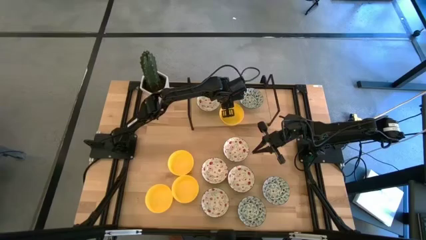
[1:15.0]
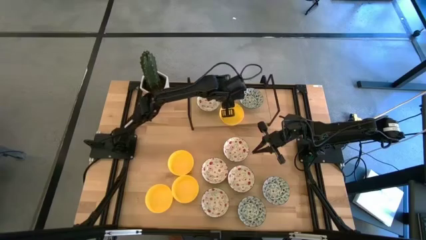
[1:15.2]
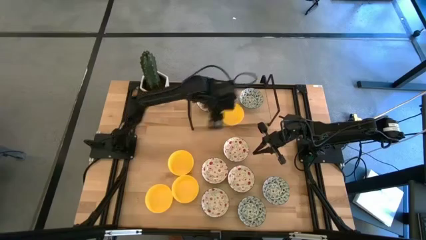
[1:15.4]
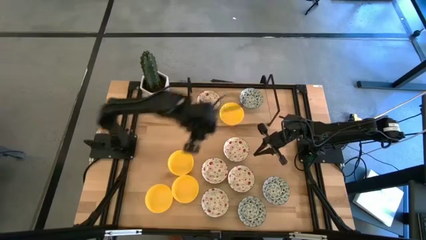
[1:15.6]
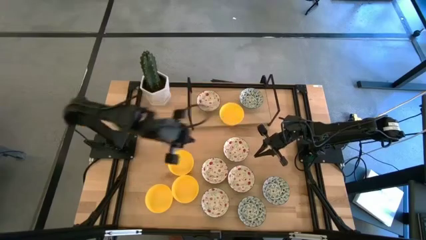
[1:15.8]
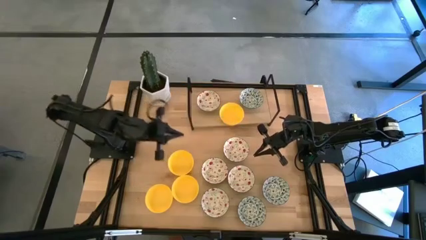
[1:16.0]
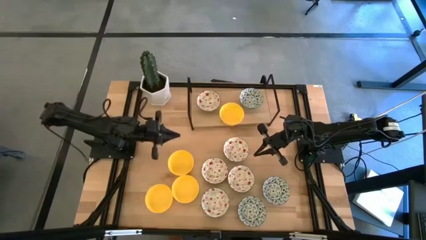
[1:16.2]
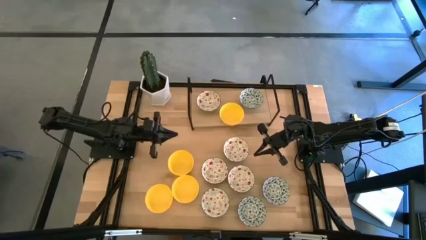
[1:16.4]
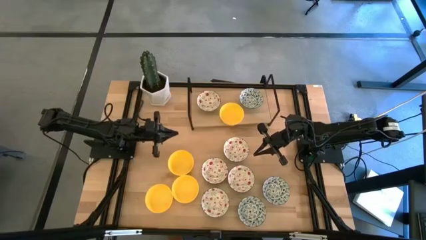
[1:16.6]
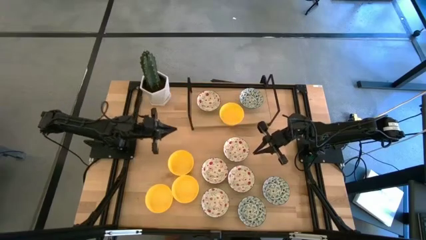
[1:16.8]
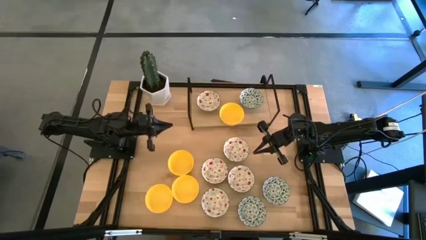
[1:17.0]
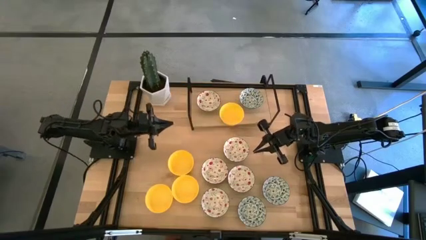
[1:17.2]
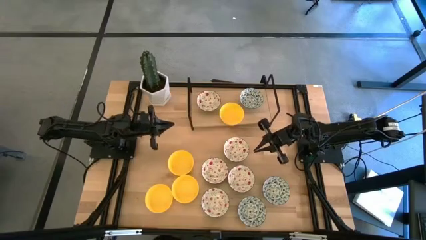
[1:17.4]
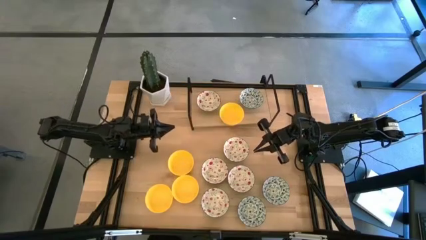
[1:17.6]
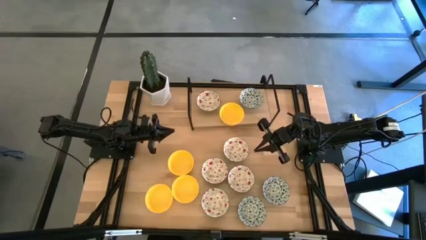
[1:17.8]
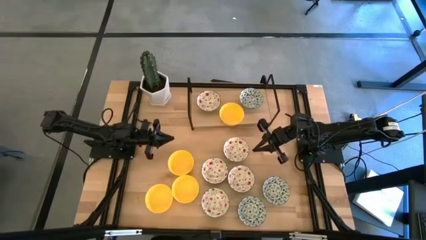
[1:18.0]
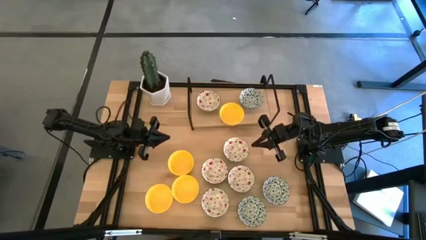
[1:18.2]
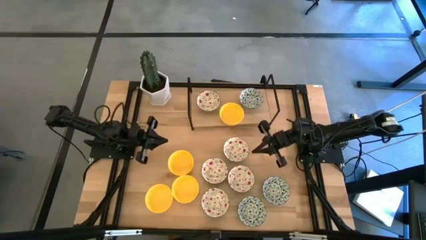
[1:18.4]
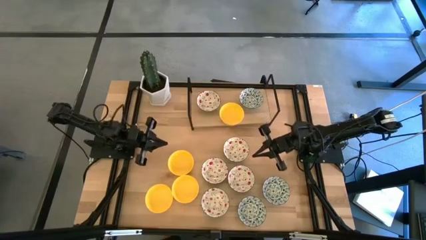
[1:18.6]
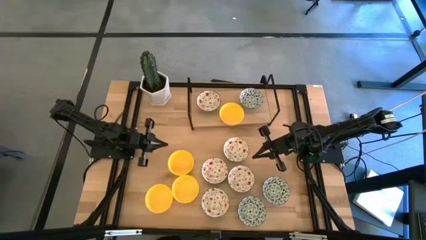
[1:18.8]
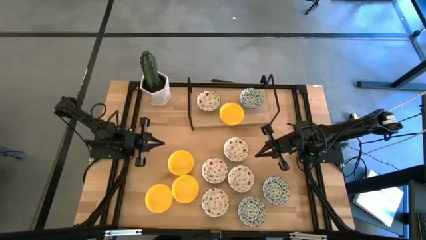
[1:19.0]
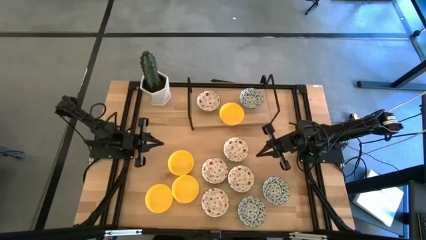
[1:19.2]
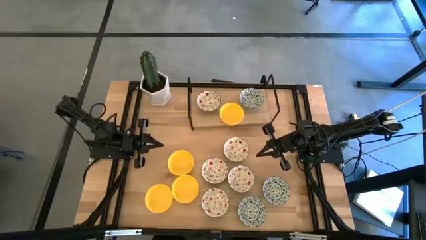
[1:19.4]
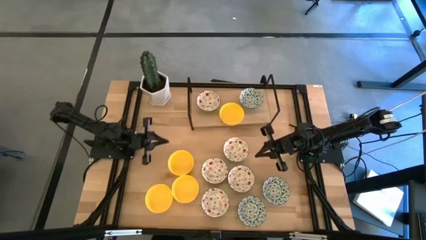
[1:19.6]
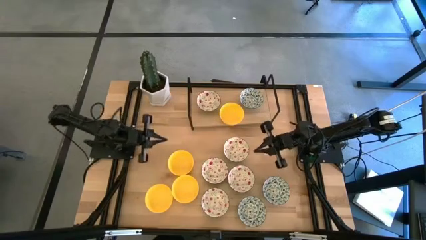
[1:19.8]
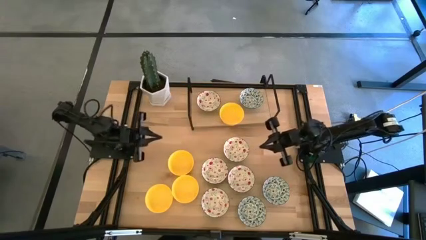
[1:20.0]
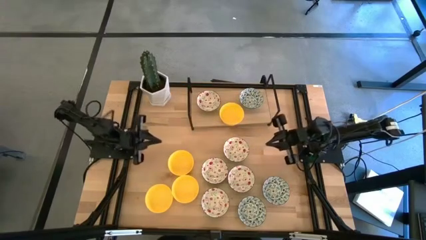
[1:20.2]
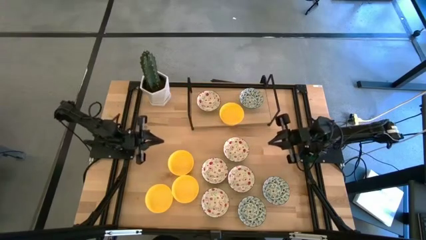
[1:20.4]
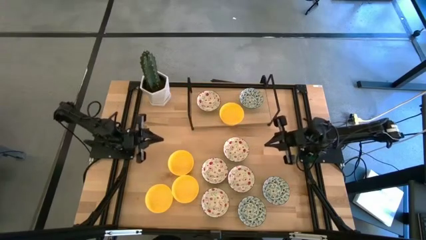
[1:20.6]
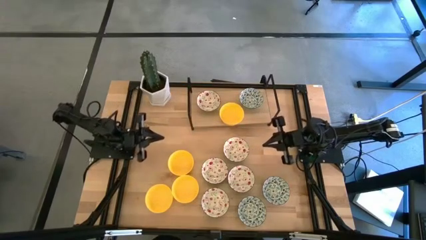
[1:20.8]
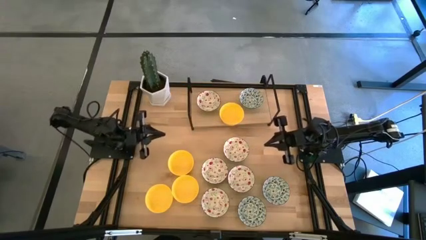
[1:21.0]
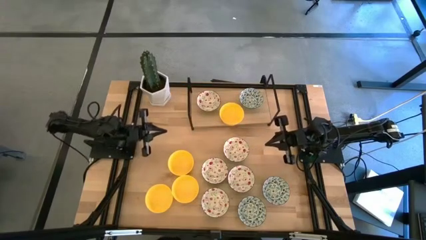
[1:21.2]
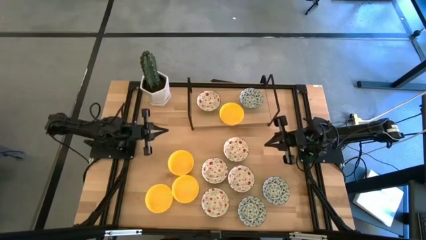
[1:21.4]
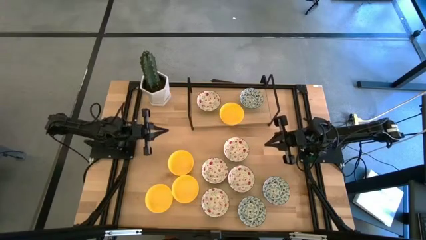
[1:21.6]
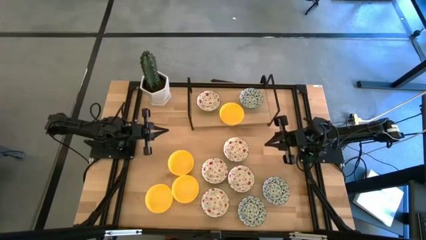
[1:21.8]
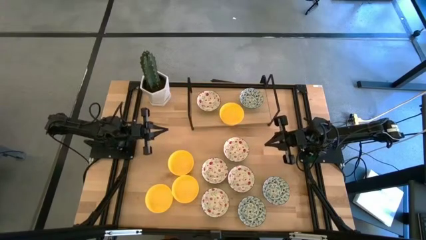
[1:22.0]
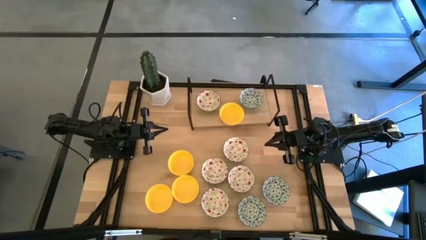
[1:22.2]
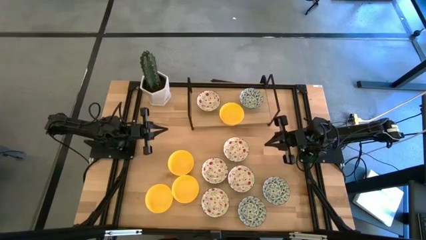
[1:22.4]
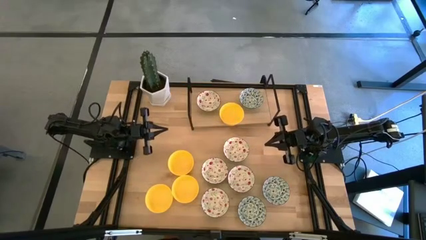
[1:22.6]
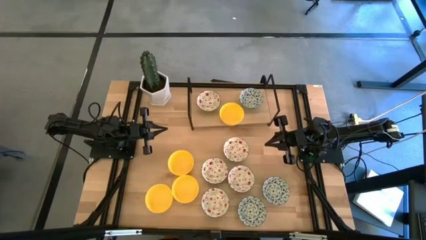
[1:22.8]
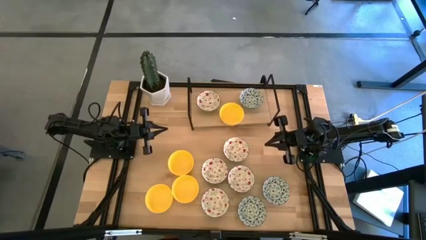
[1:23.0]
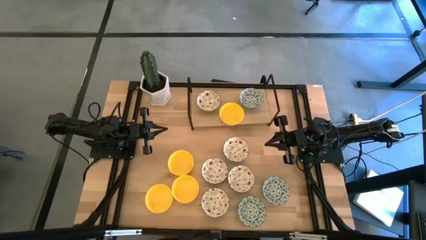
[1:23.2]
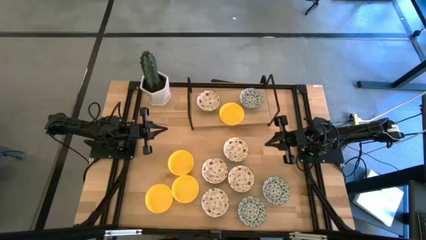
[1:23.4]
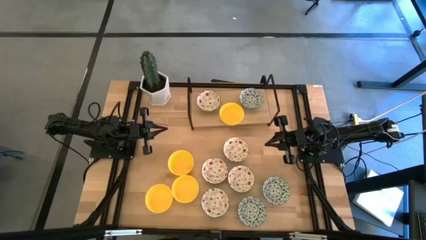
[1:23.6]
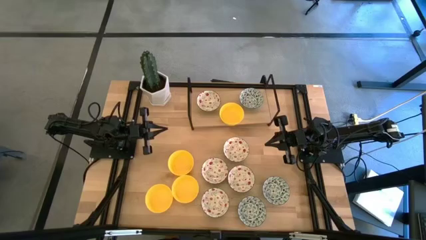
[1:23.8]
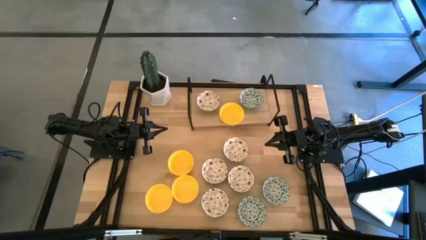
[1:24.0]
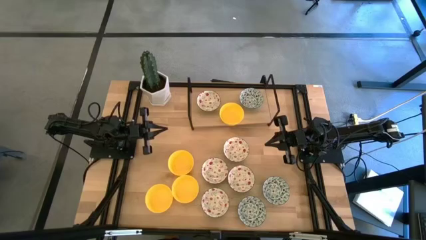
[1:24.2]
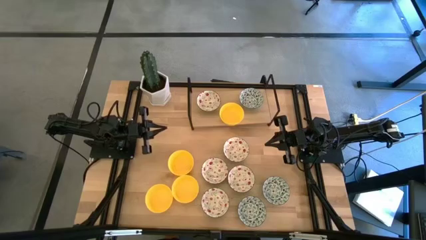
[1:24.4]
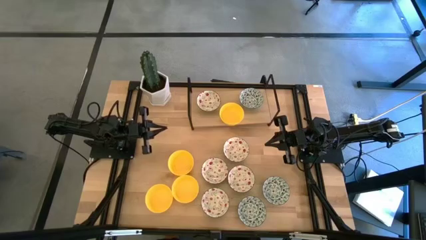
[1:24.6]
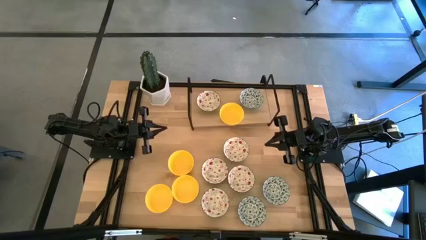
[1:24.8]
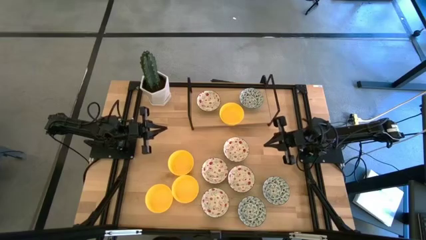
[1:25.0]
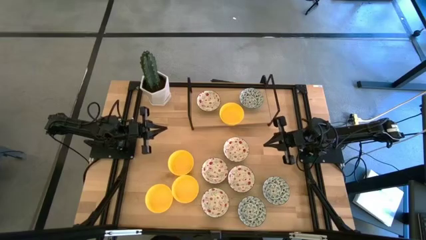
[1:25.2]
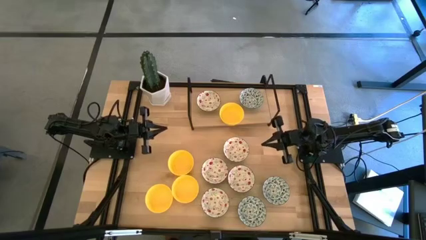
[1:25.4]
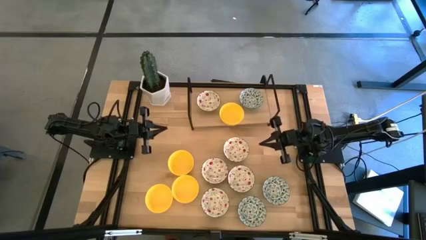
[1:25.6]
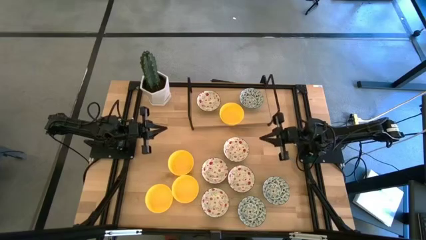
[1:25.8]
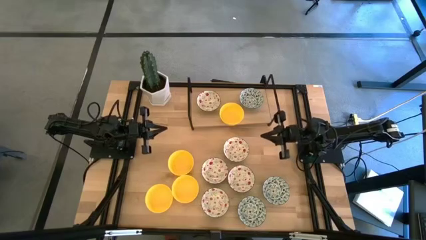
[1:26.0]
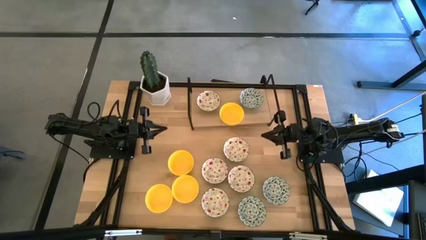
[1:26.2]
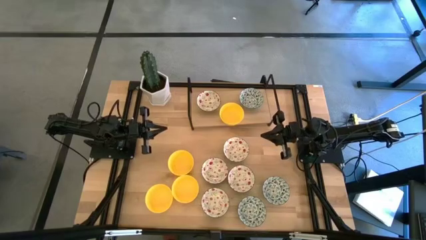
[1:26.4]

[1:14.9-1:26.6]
Task: Pick & Place Mini bowls
Stack the red patterned bowl on top of the red patterned bowl on the shelf
